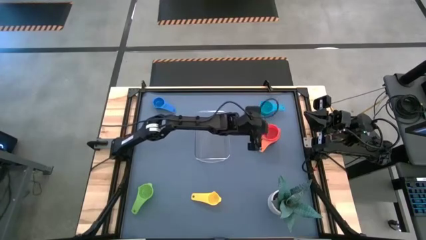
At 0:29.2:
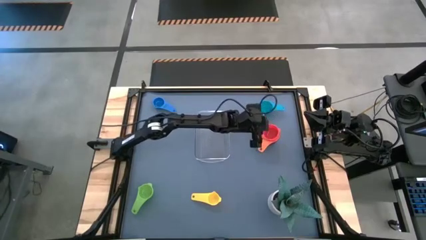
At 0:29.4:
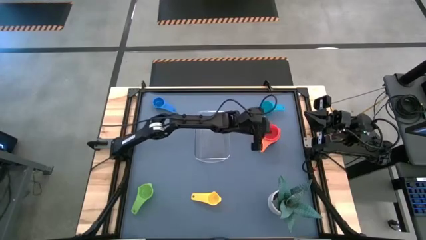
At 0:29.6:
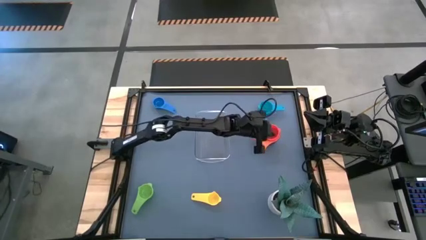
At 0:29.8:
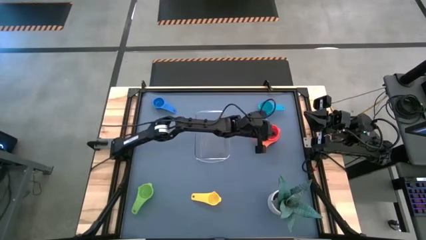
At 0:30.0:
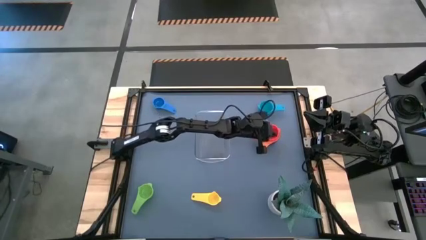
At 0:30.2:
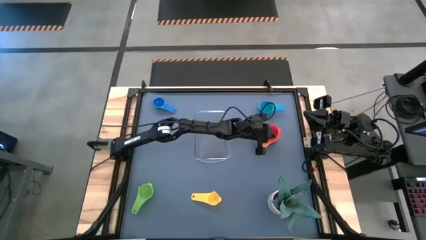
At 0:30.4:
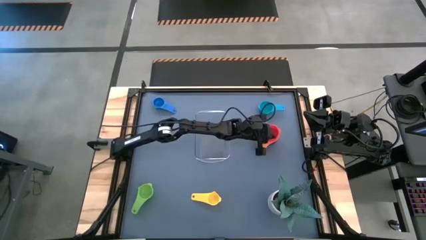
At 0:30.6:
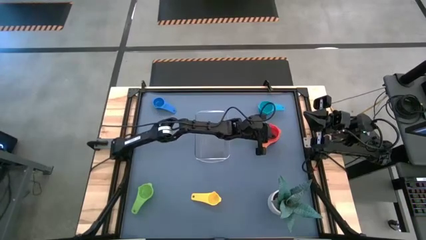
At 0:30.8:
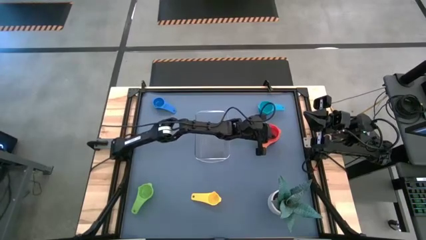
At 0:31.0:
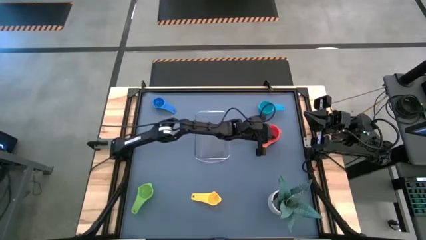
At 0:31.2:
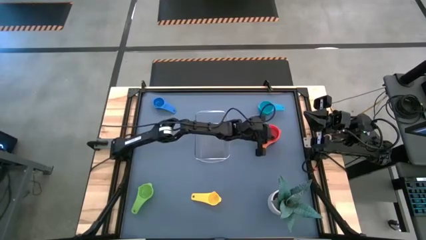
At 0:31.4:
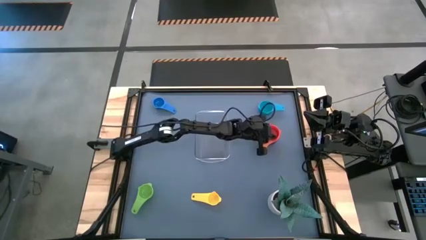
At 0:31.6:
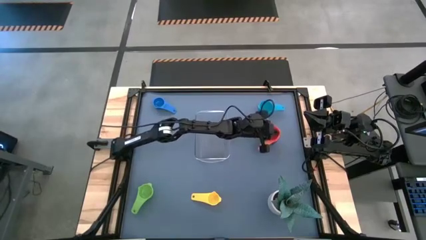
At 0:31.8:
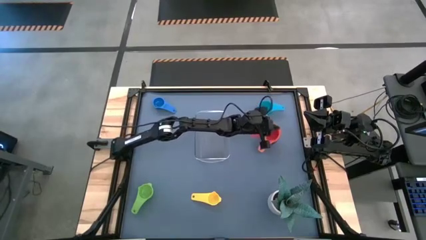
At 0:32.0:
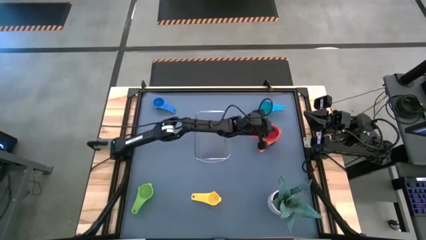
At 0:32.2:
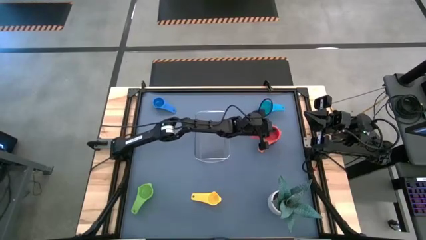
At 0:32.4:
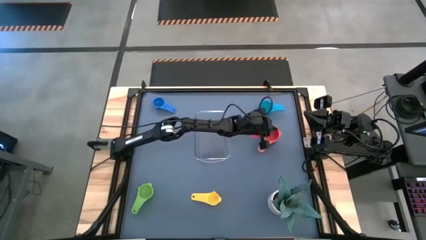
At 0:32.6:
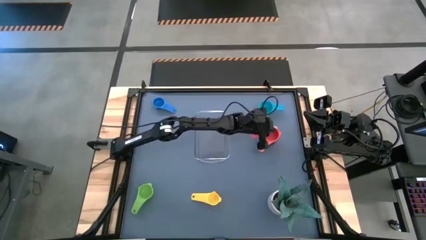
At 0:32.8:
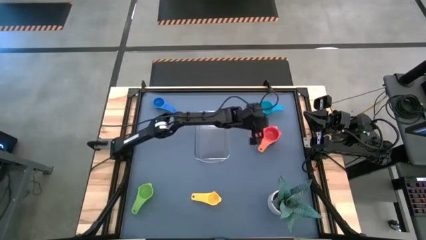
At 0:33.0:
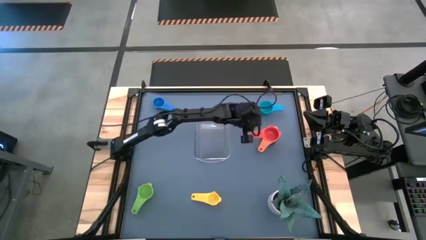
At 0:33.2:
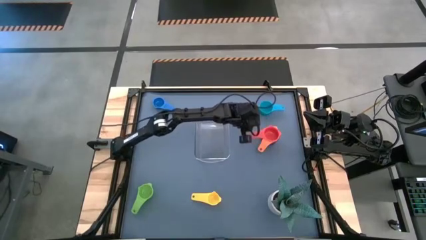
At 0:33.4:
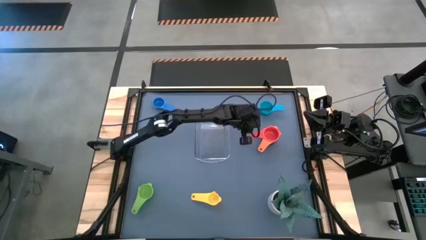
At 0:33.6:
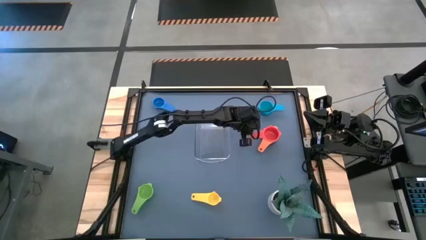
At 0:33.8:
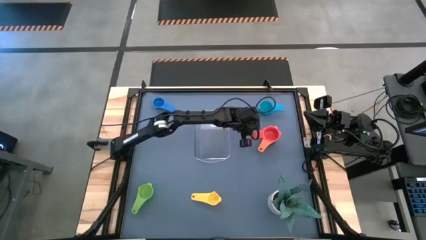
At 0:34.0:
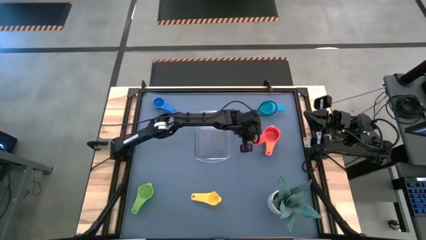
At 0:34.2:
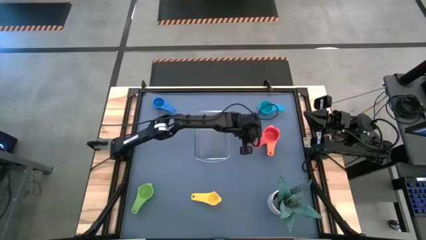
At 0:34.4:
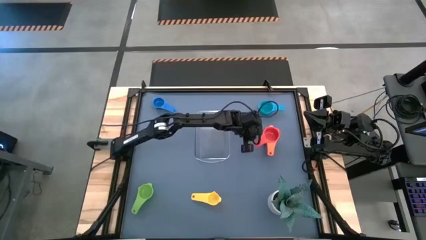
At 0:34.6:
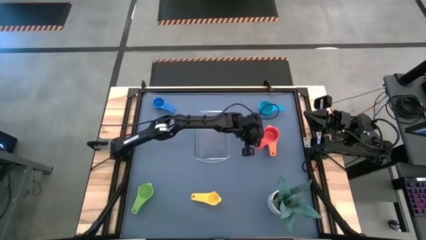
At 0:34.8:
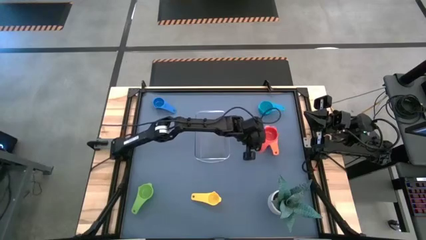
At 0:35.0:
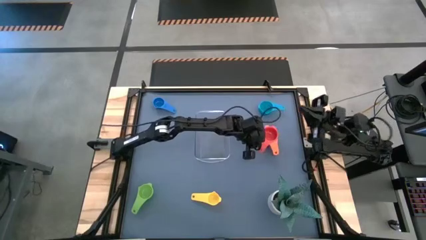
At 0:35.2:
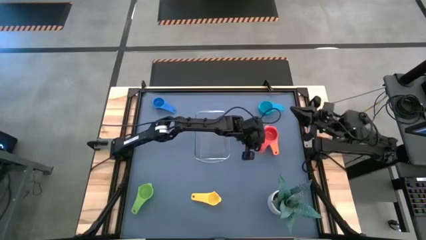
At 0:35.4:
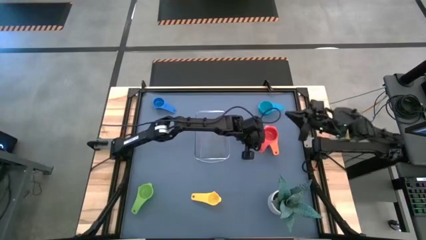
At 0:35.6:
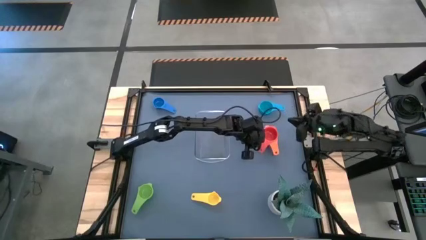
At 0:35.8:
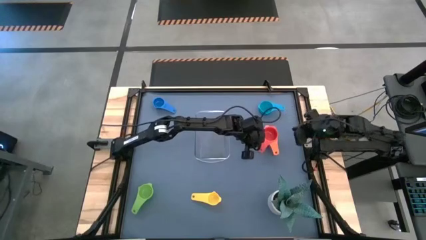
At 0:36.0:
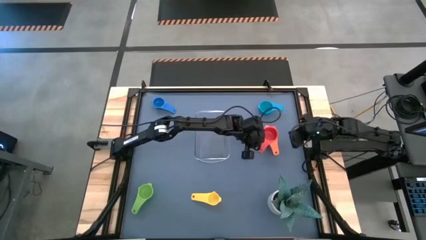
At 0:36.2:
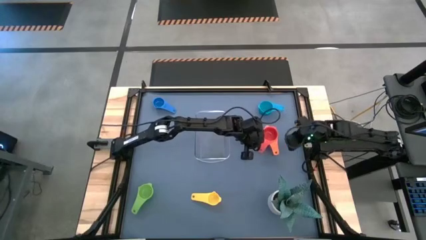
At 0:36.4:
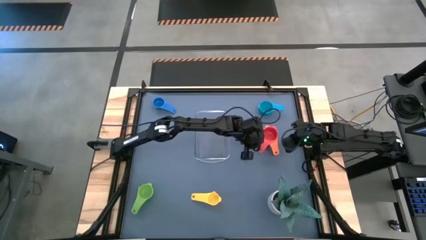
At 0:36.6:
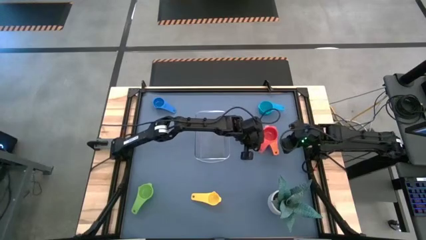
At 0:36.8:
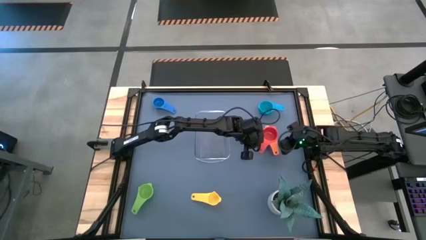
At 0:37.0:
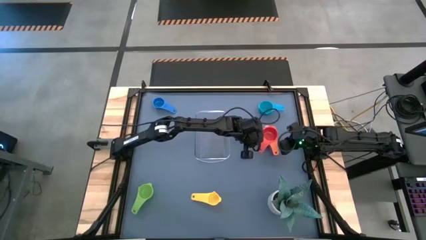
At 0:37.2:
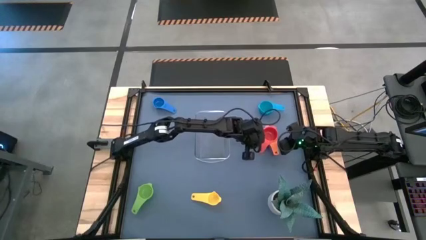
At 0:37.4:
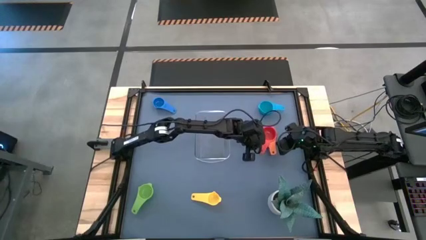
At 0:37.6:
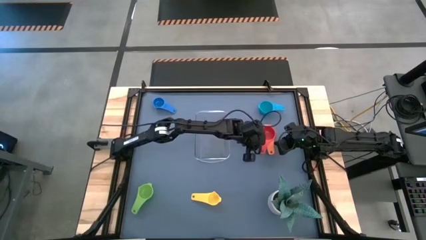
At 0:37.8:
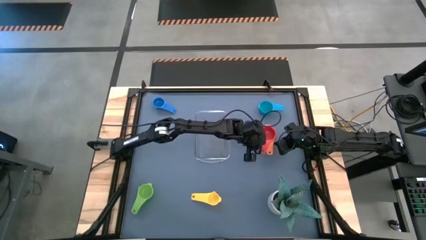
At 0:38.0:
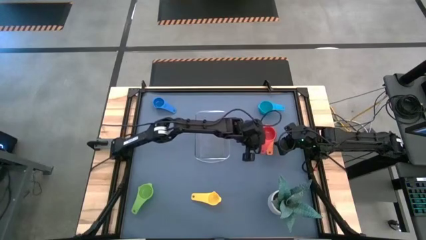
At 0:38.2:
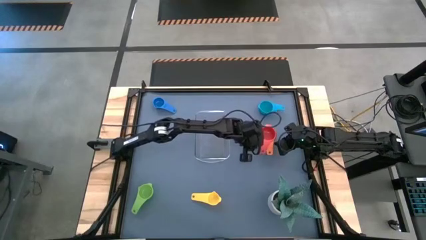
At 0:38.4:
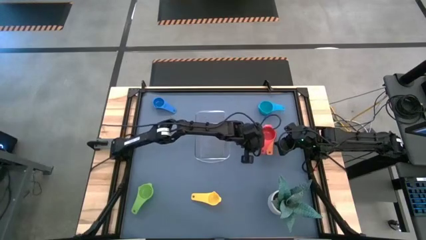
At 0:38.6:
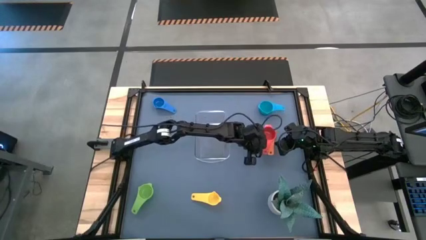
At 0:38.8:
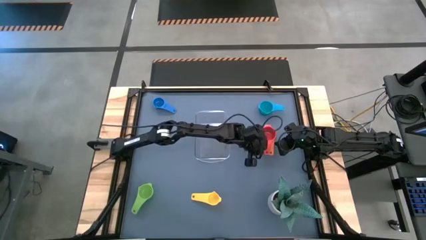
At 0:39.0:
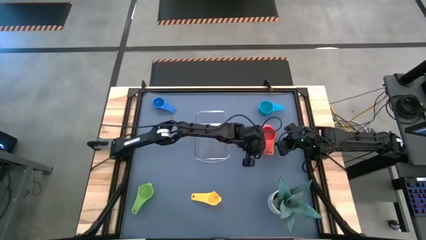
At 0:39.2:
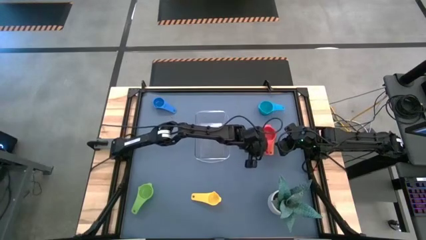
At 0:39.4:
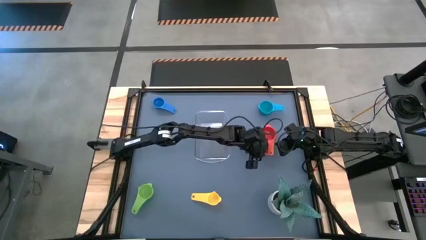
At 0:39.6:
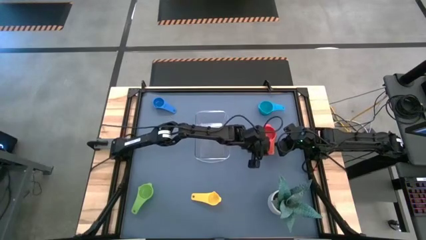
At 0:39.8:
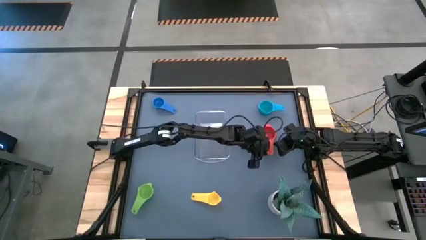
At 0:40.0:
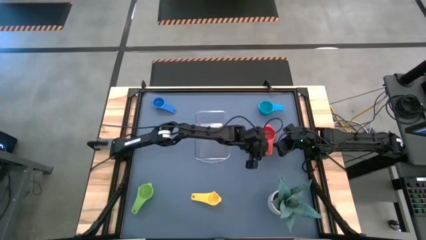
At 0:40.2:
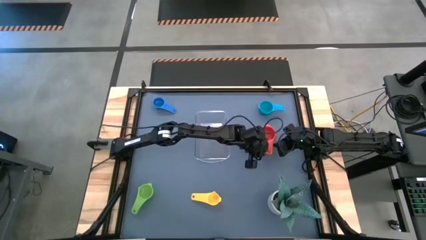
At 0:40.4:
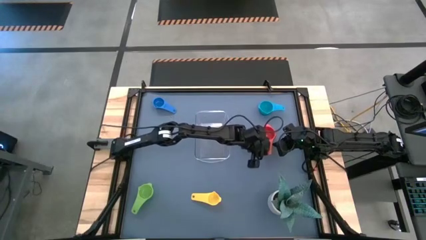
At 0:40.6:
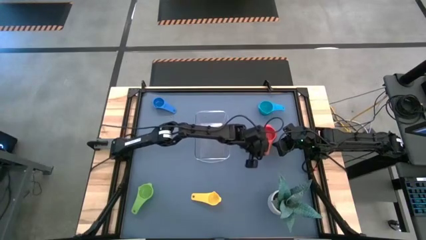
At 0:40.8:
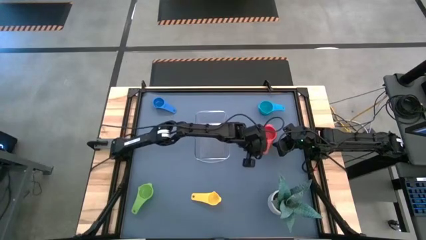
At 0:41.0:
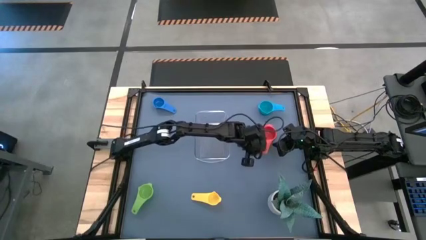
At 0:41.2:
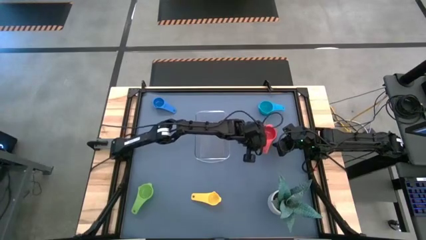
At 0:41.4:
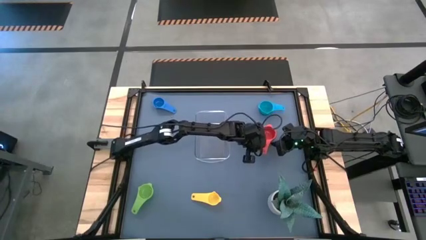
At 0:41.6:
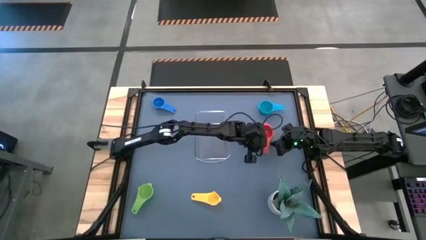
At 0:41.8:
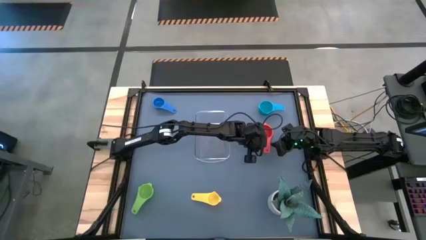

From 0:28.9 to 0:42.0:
Task: Nest measuring cups in basket
Stack the red measuring cup on top of the orange measuring cup
